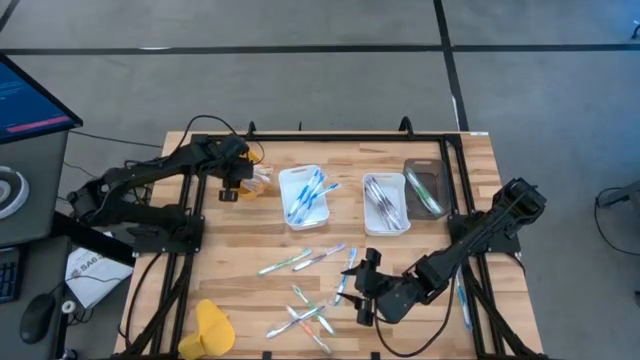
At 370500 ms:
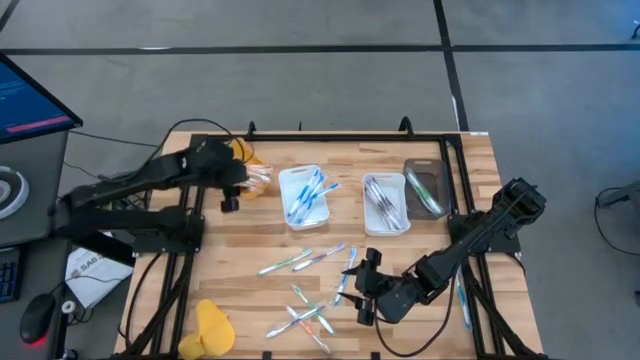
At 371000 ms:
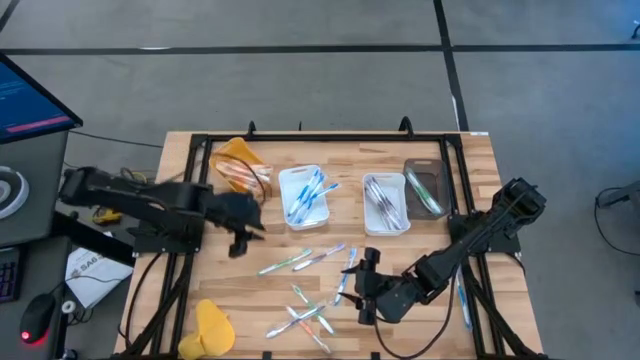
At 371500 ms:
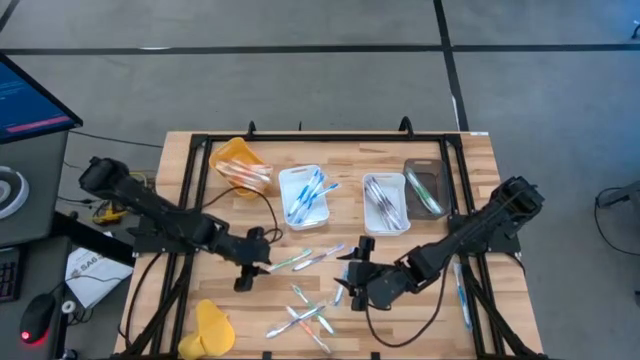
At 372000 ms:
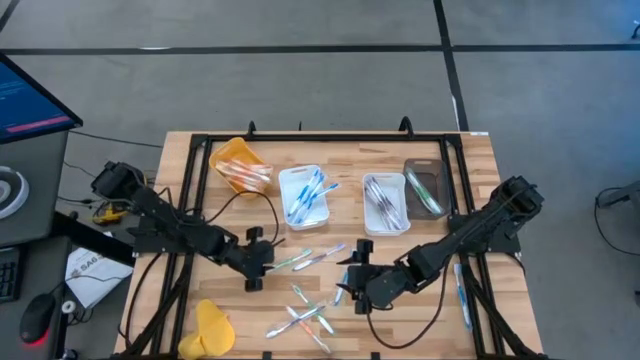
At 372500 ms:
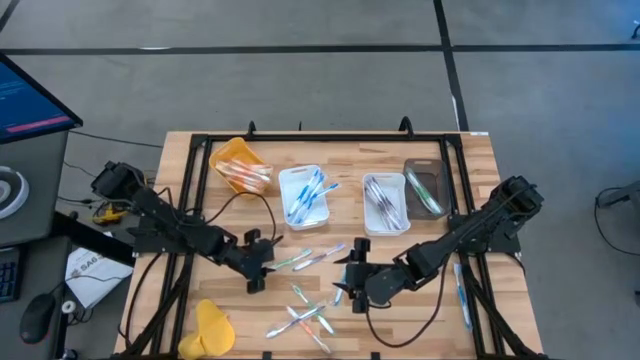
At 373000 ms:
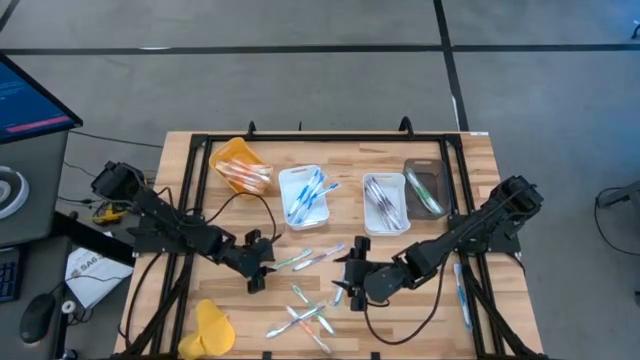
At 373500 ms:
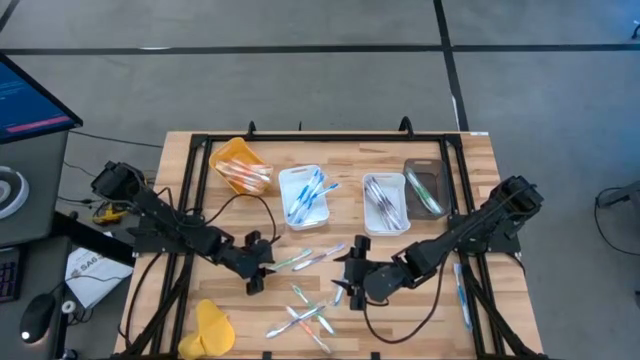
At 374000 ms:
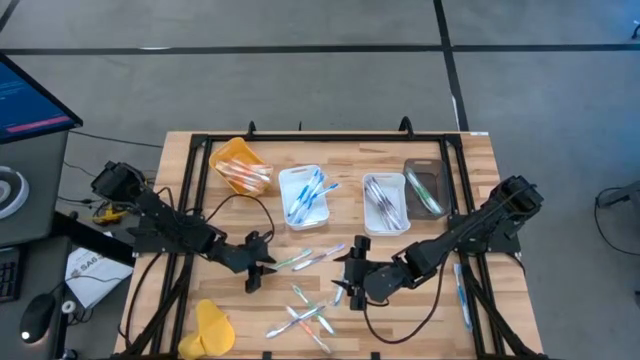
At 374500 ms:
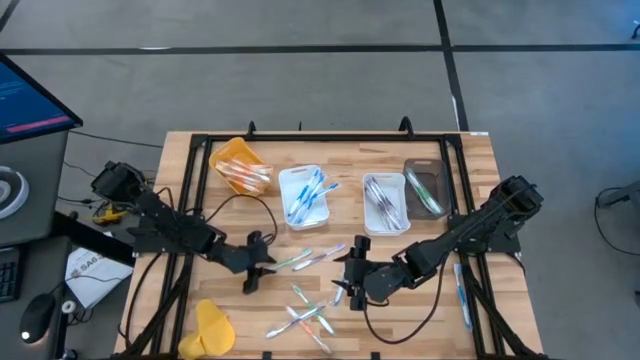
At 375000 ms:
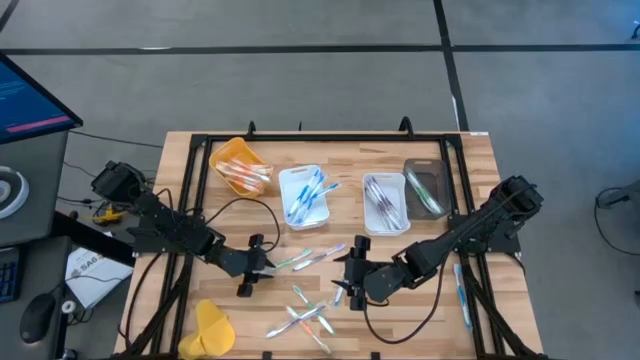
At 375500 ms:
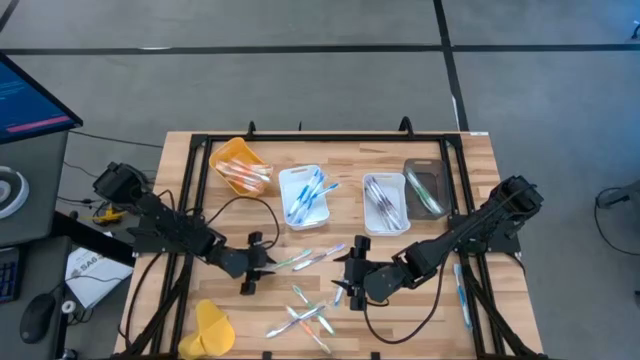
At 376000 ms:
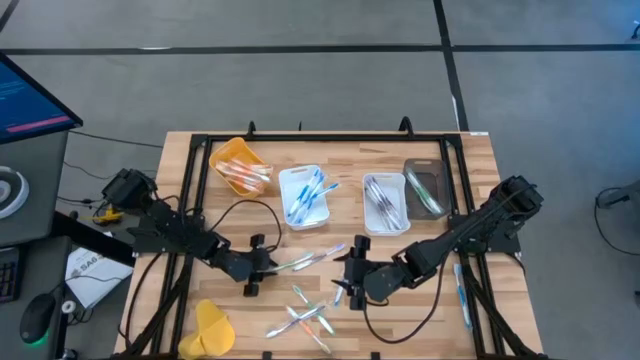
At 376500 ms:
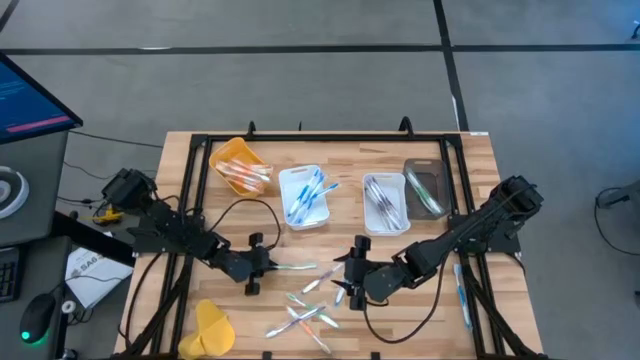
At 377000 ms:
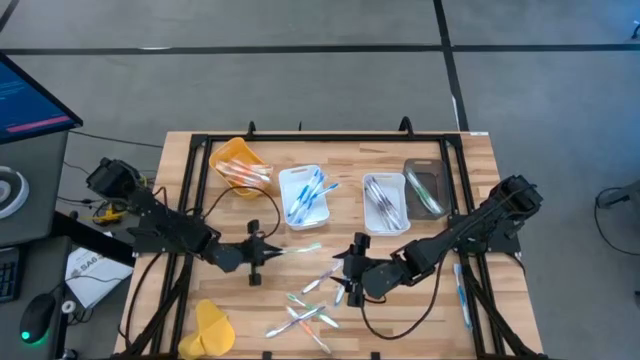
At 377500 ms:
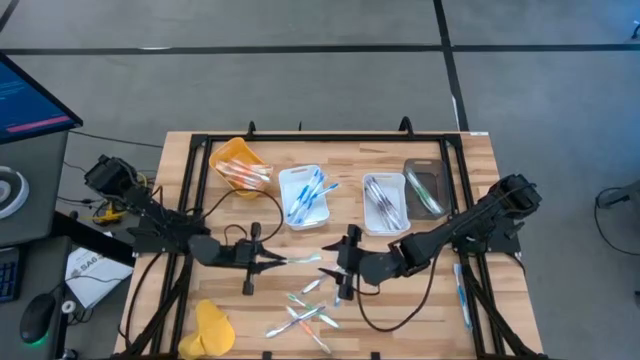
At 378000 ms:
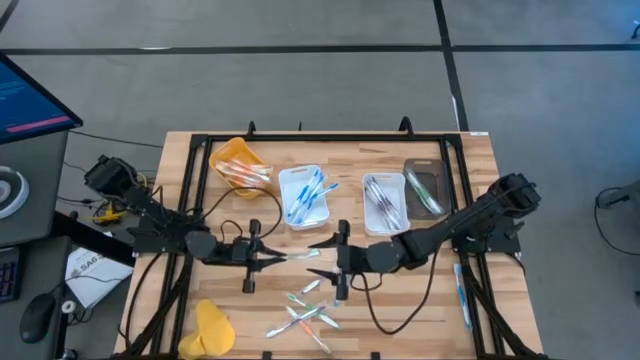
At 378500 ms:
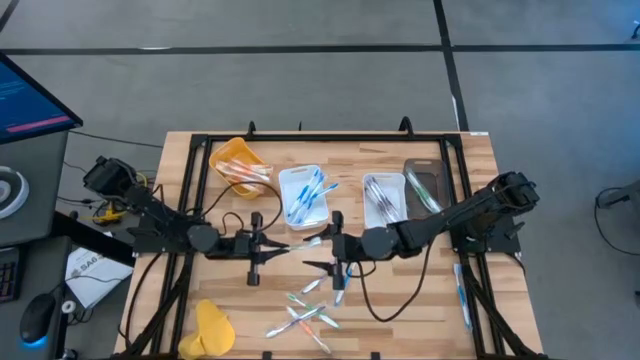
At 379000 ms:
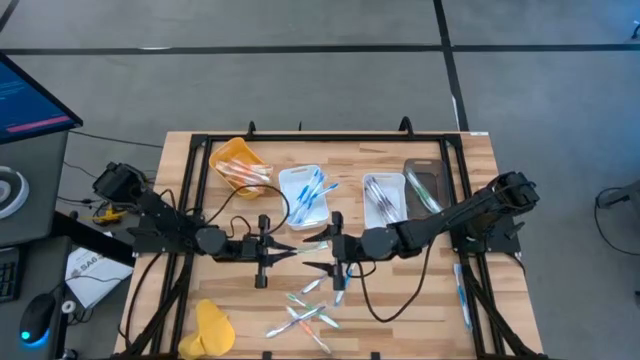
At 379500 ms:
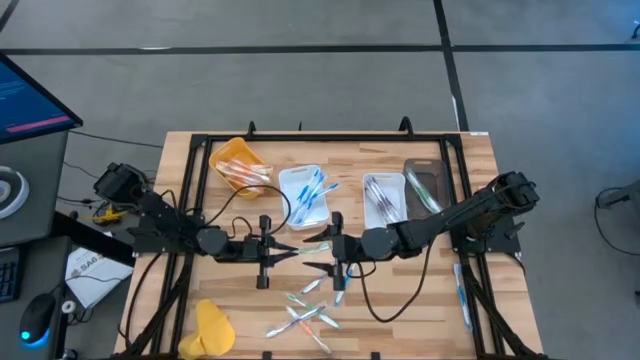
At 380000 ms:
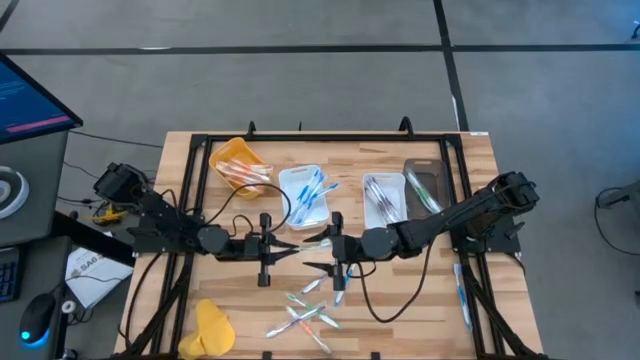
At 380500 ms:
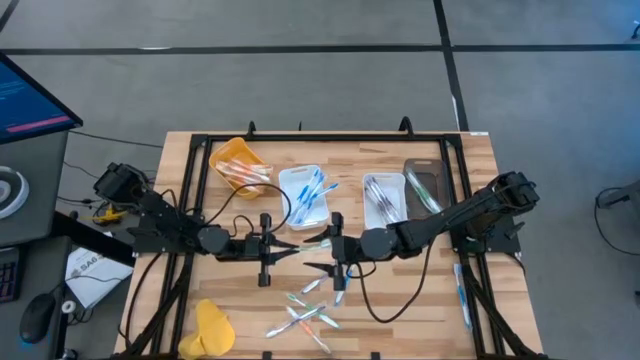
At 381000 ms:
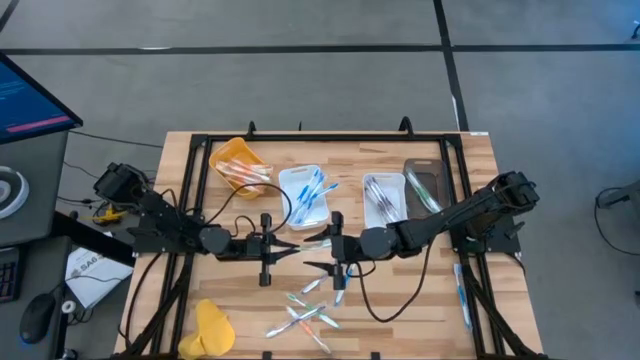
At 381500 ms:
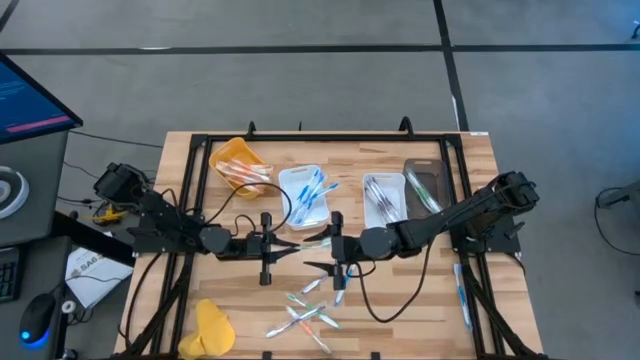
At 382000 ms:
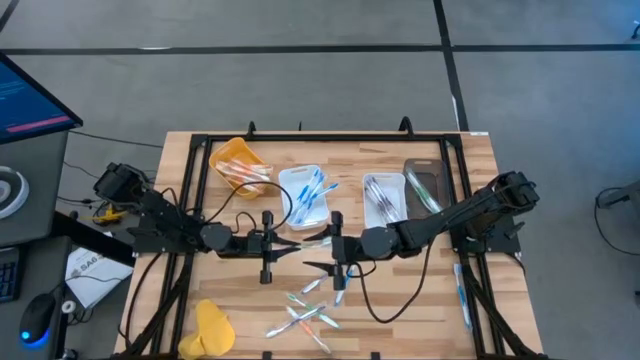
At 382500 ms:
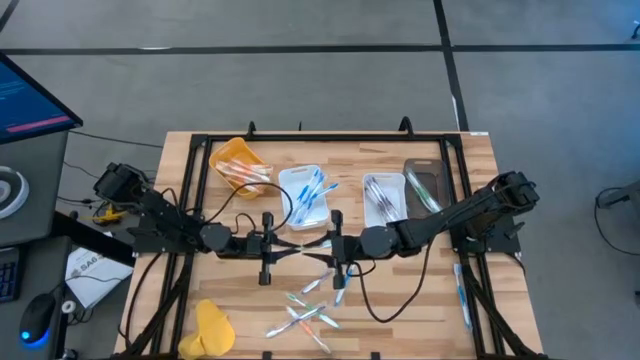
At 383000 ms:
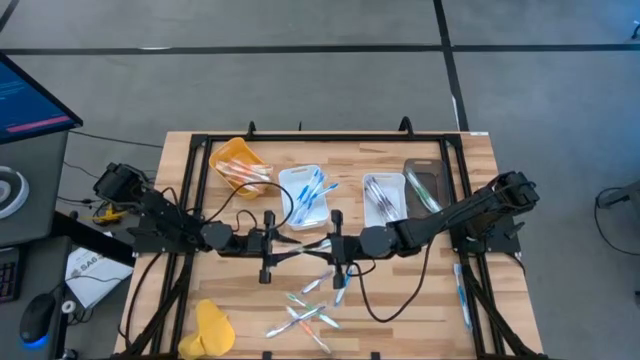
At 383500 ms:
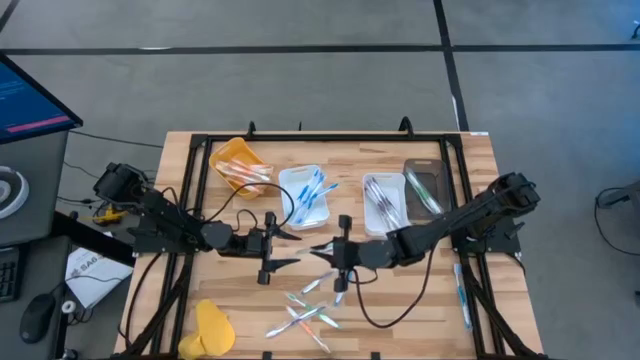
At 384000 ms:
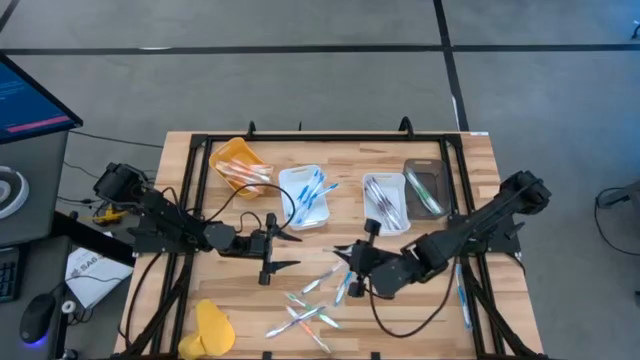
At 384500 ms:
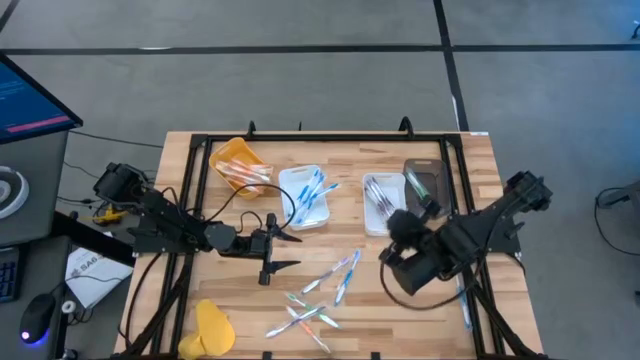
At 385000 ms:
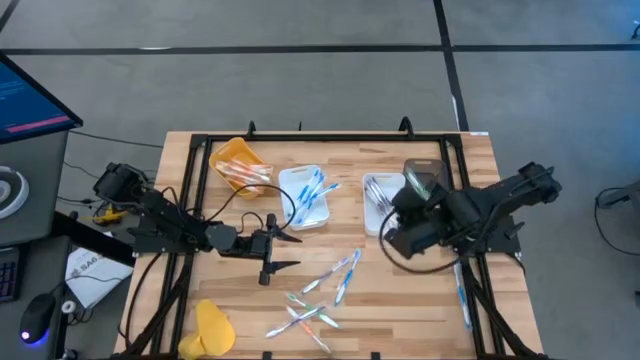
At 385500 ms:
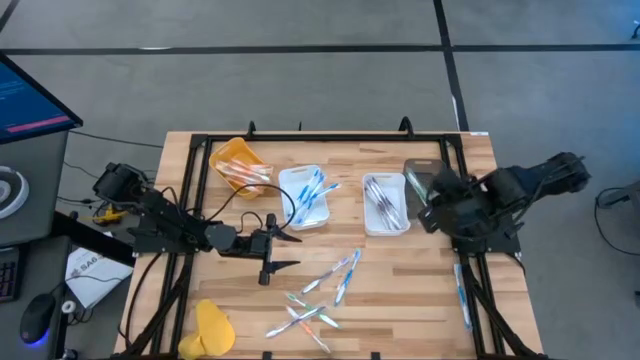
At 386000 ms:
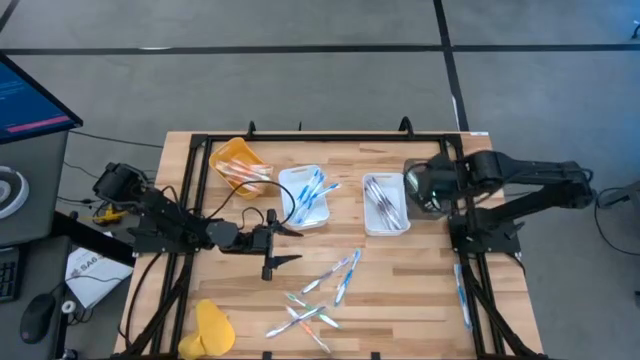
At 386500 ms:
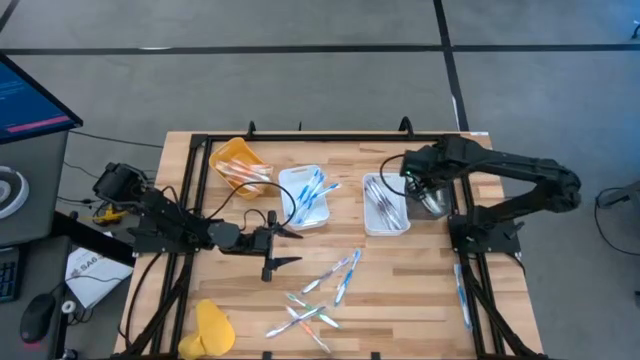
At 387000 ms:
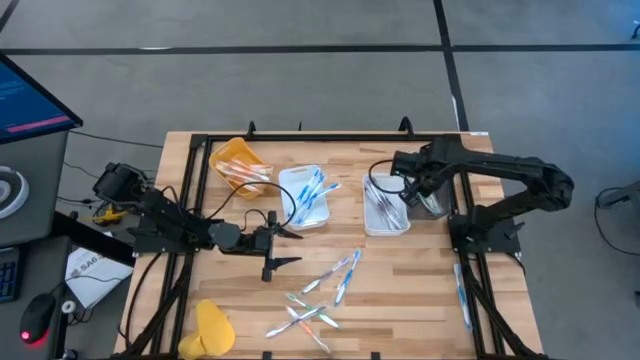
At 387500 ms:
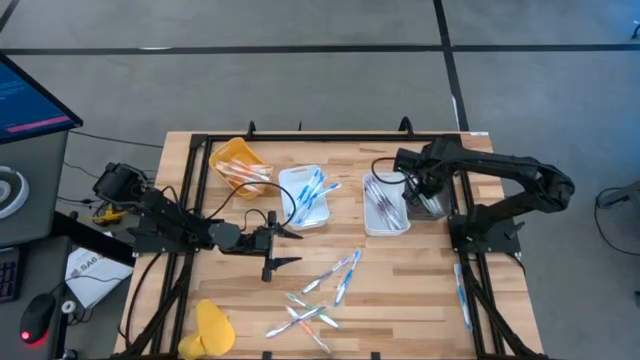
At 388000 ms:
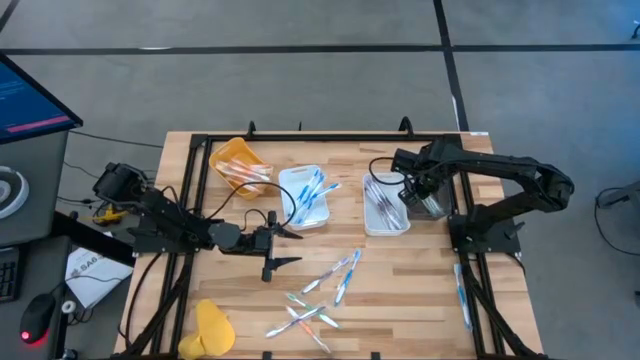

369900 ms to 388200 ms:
Task: Pick & Place Toothbrushes
Put the top green toothbrush into the black bin

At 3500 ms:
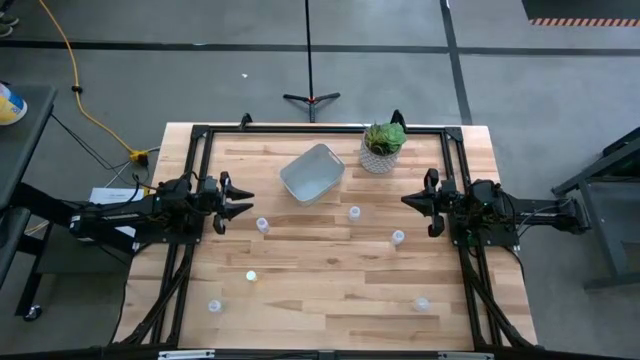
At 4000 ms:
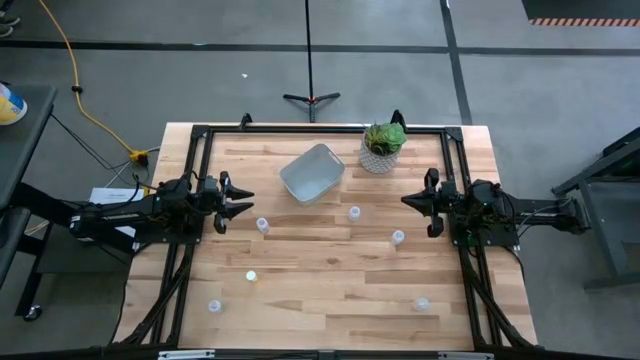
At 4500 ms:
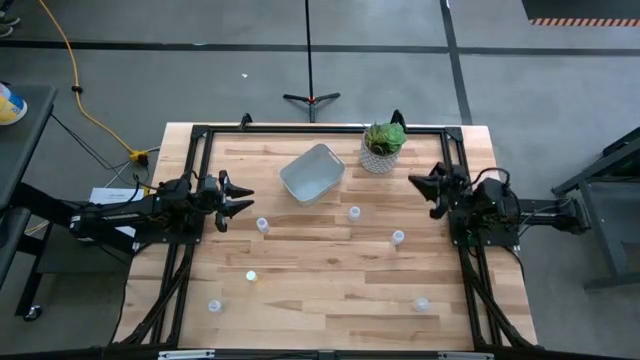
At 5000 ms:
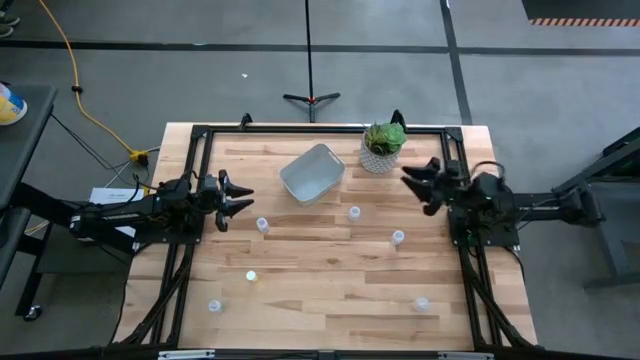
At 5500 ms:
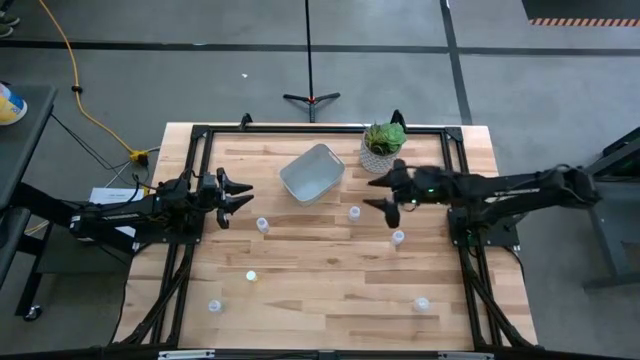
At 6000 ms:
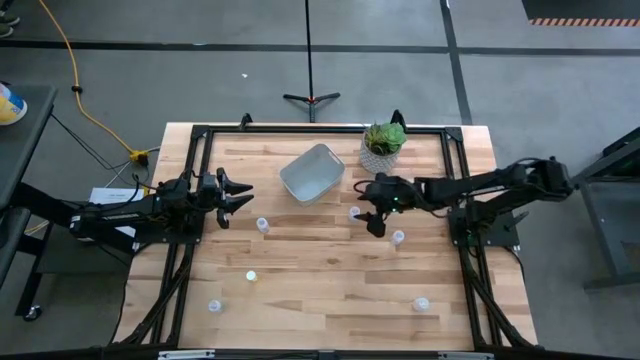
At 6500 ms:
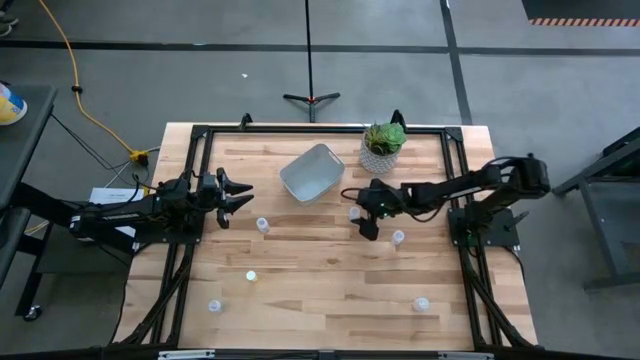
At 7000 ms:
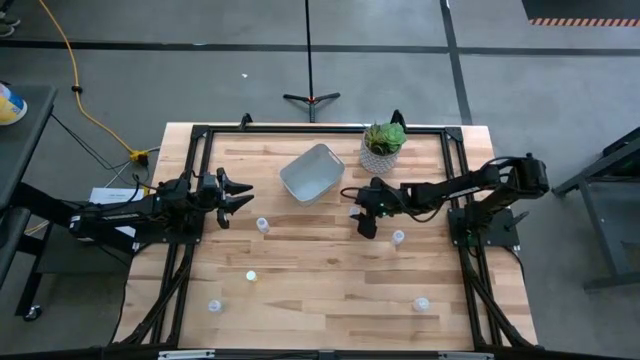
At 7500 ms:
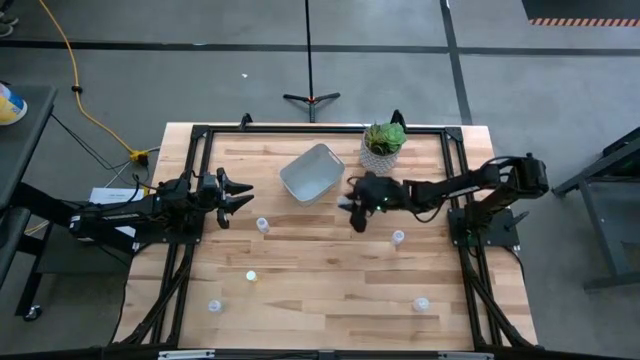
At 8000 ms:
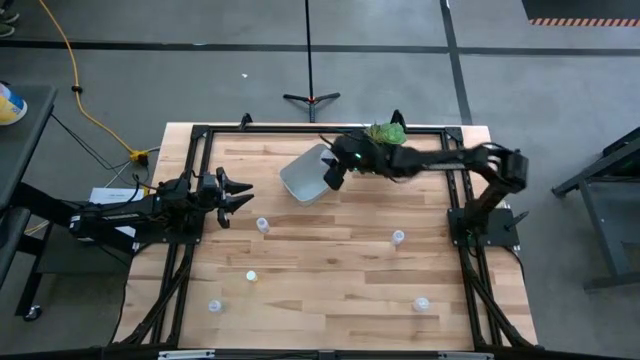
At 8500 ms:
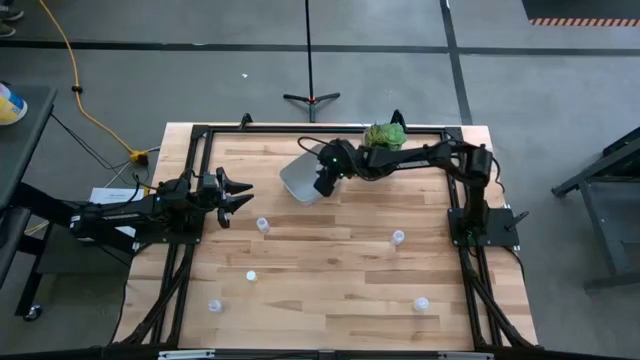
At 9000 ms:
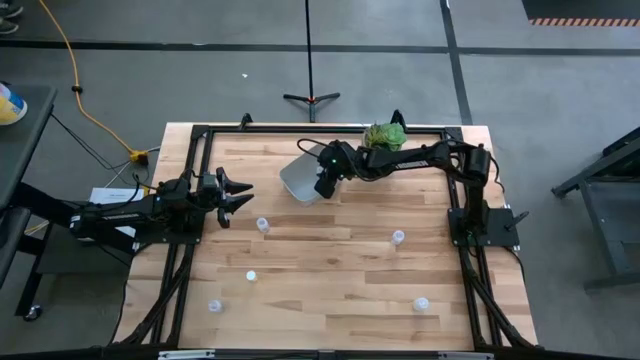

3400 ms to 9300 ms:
Task: Pick and place pill bottles into a basket
Put the transparent medicine bottle into the gray bin
